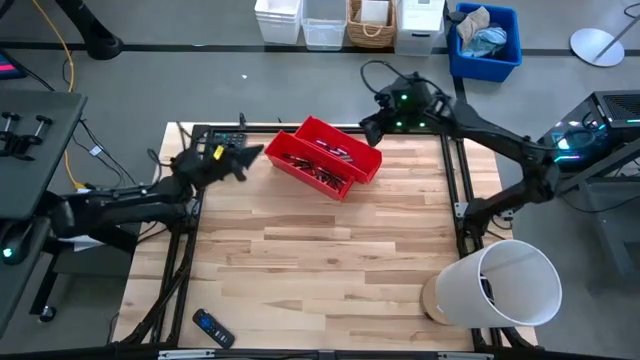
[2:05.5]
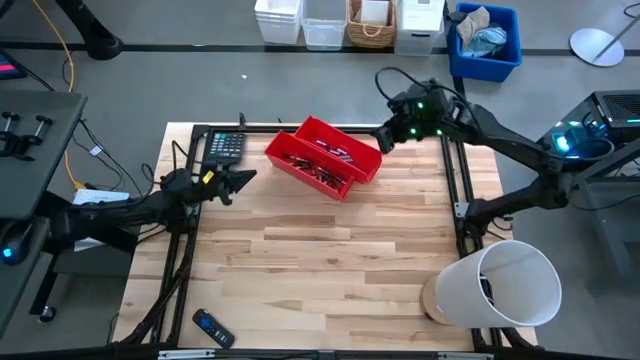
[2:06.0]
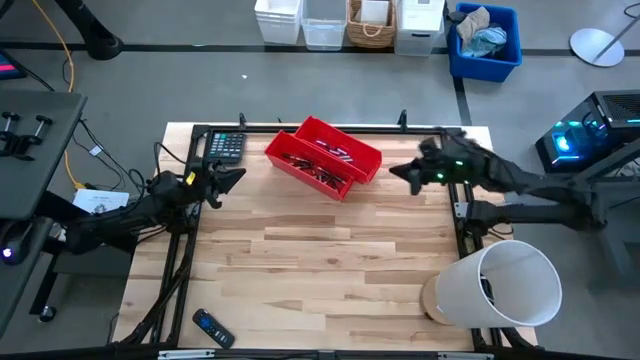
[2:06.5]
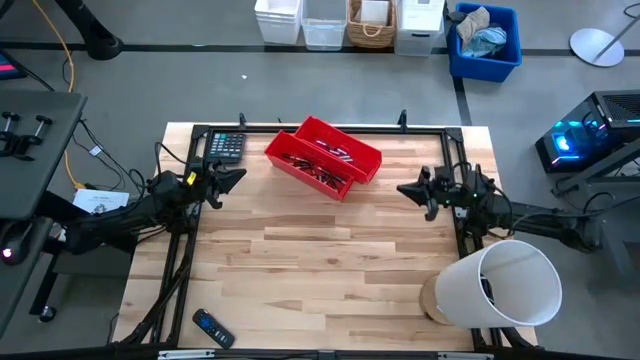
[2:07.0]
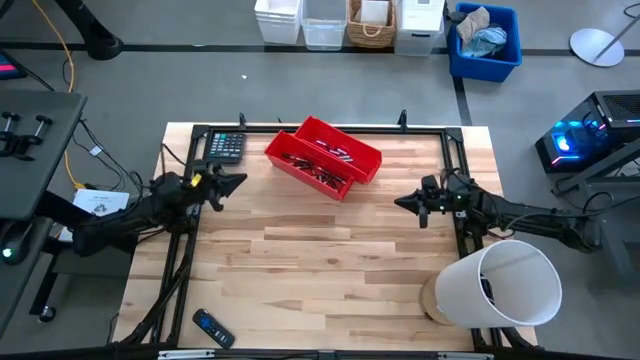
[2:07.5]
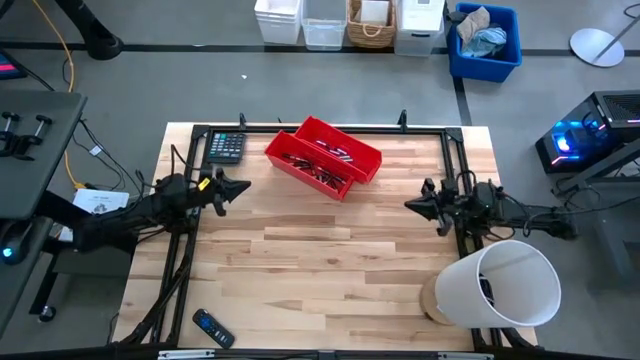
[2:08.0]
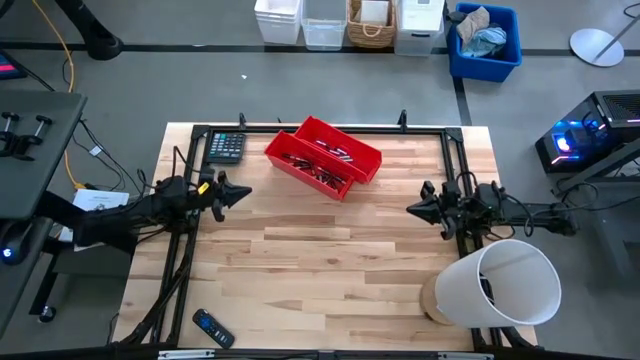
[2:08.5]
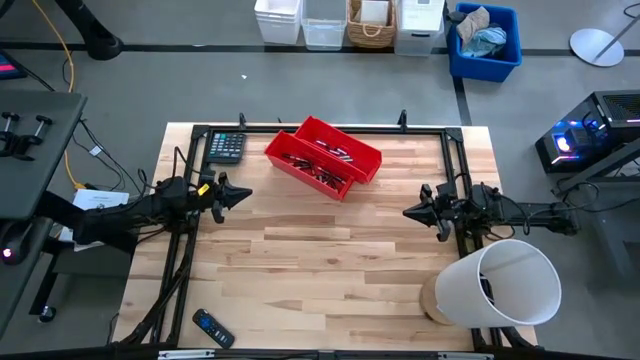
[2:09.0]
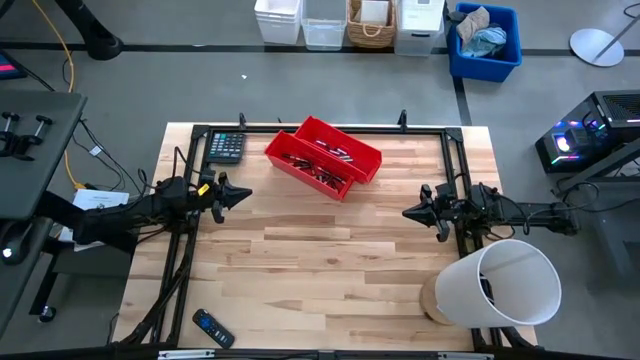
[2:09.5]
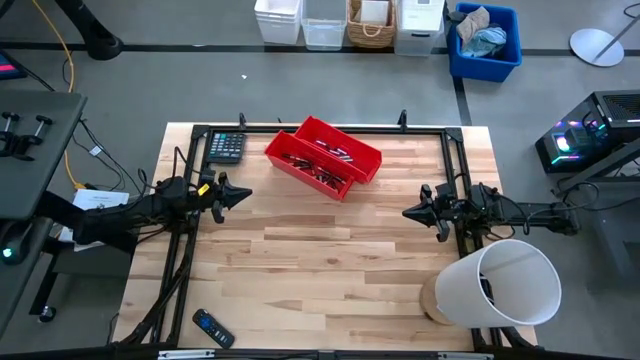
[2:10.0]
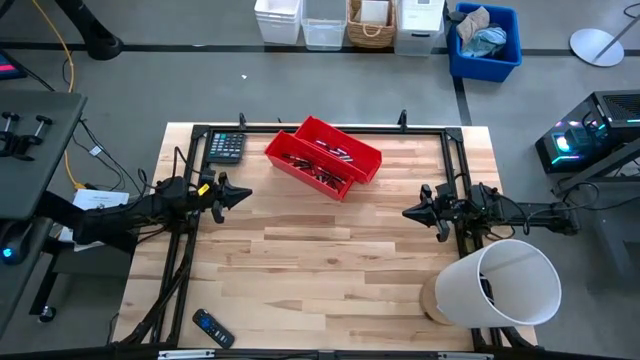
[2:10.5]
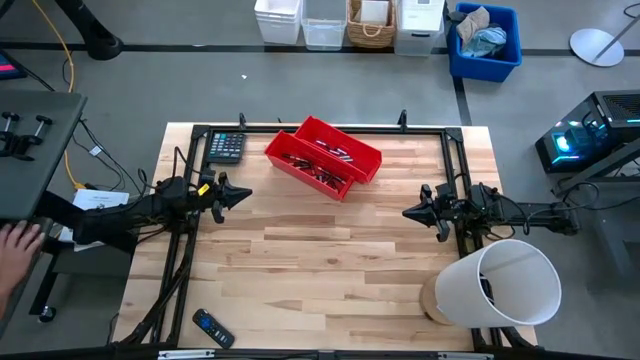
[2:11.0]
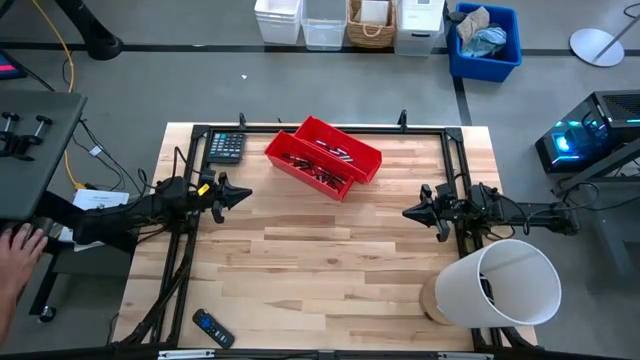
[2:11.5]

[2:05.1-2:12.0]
Task: Sort batteries
Return to Home Position

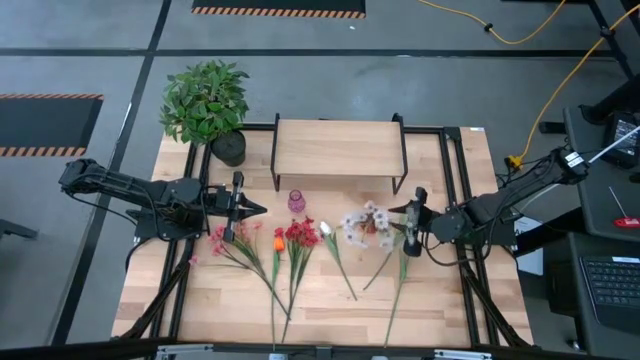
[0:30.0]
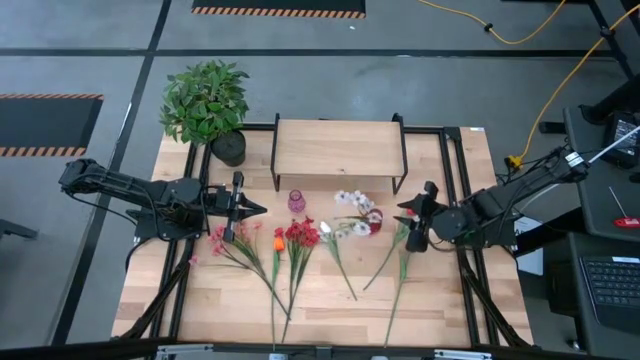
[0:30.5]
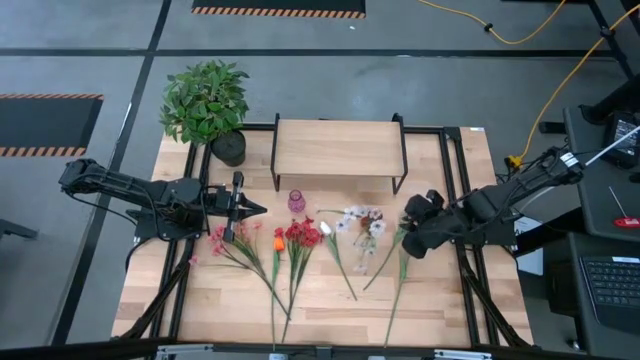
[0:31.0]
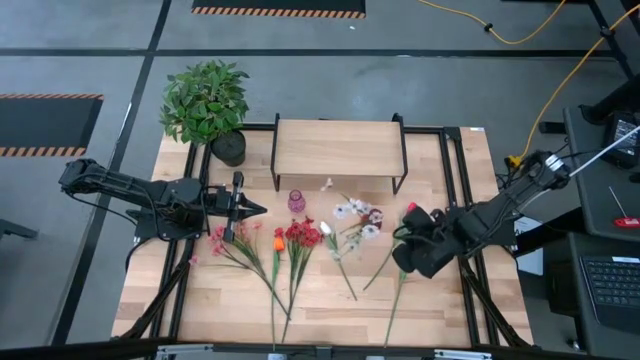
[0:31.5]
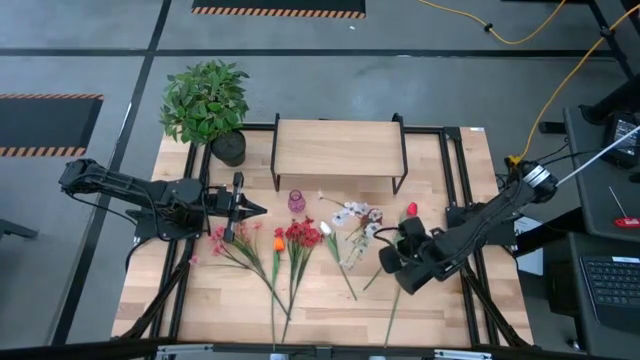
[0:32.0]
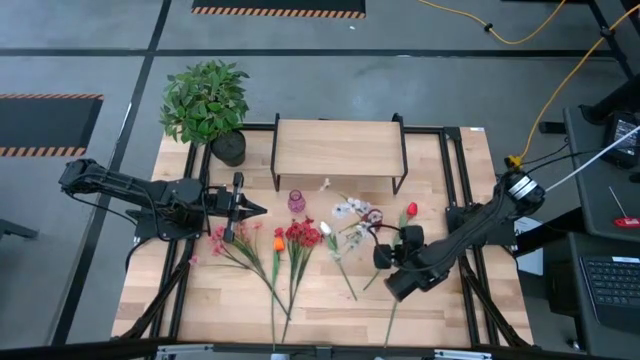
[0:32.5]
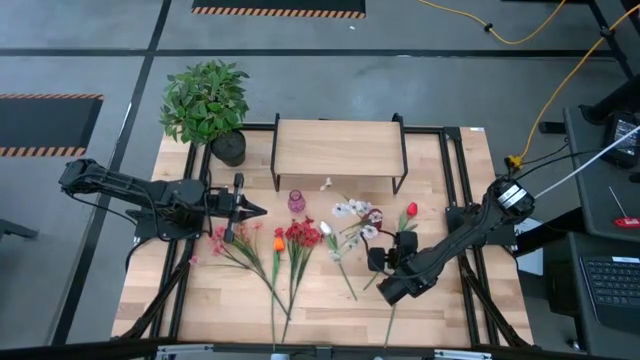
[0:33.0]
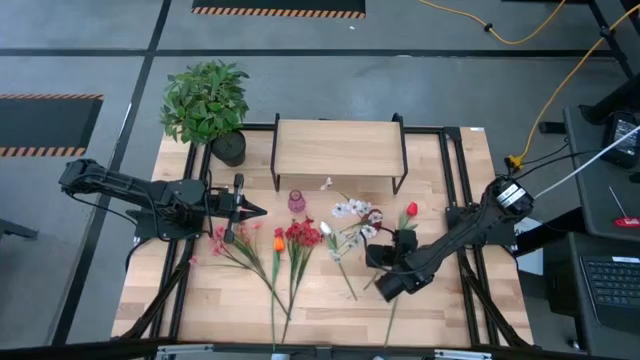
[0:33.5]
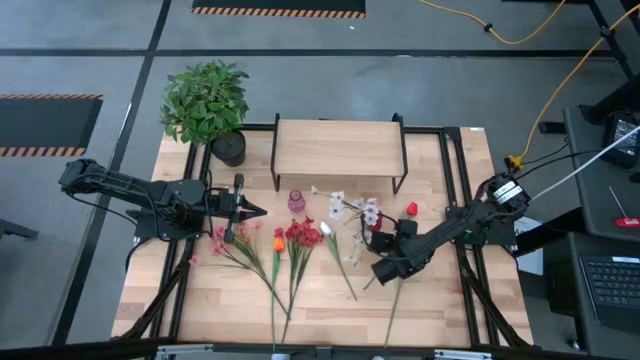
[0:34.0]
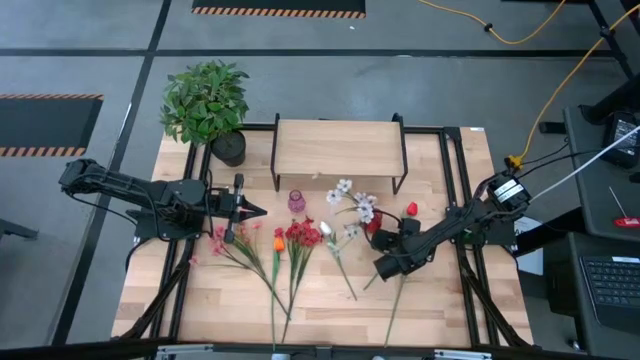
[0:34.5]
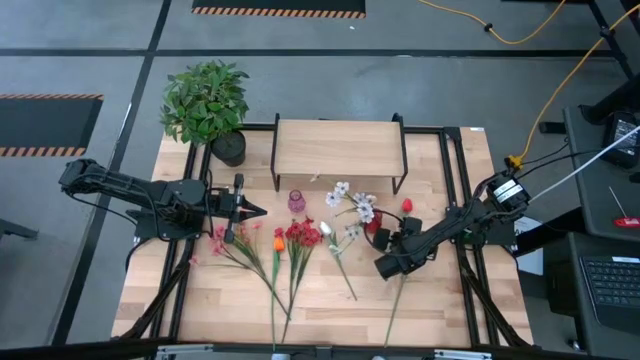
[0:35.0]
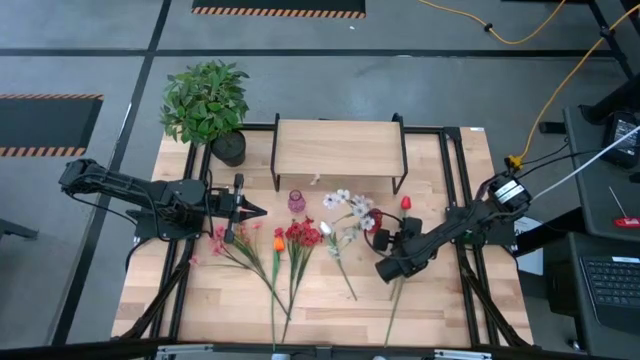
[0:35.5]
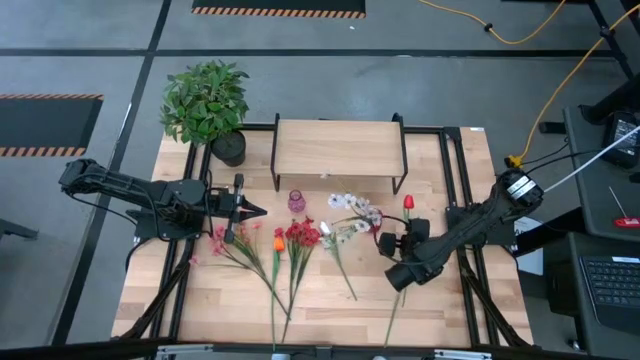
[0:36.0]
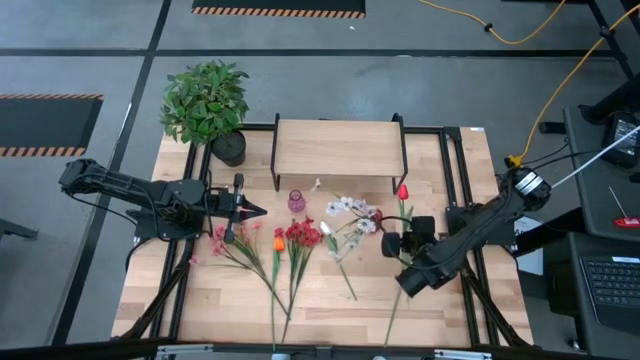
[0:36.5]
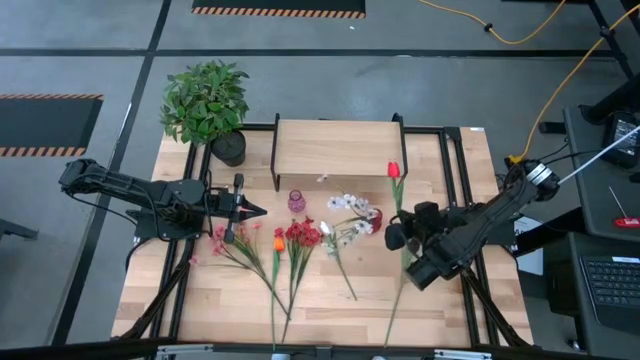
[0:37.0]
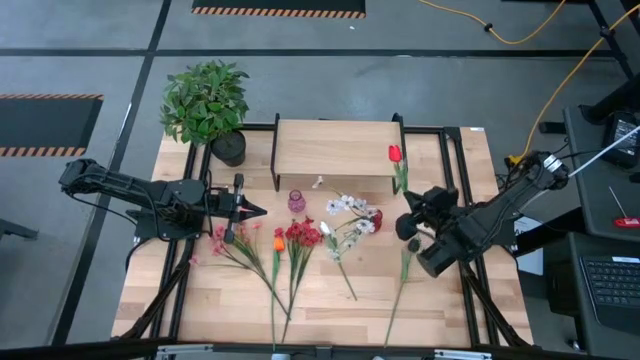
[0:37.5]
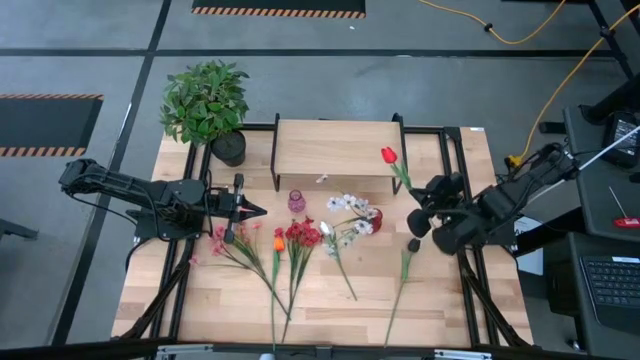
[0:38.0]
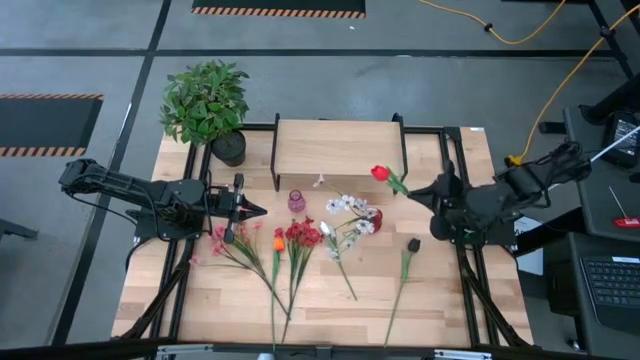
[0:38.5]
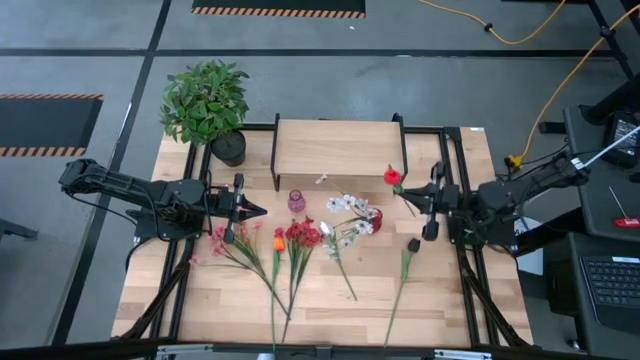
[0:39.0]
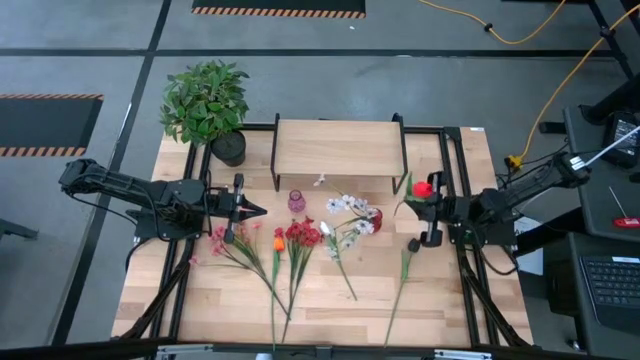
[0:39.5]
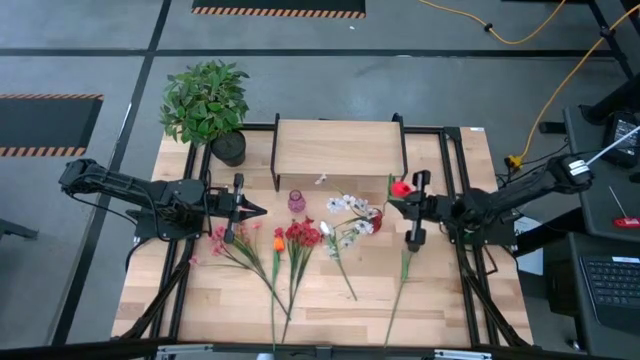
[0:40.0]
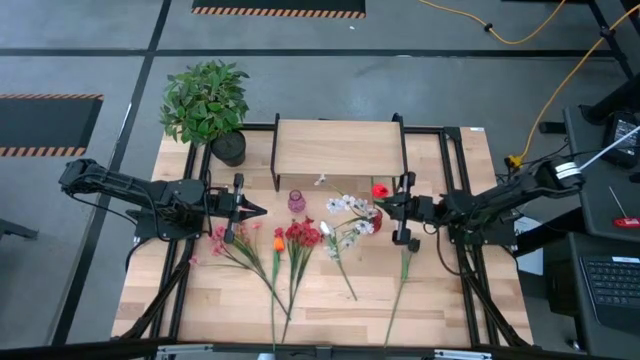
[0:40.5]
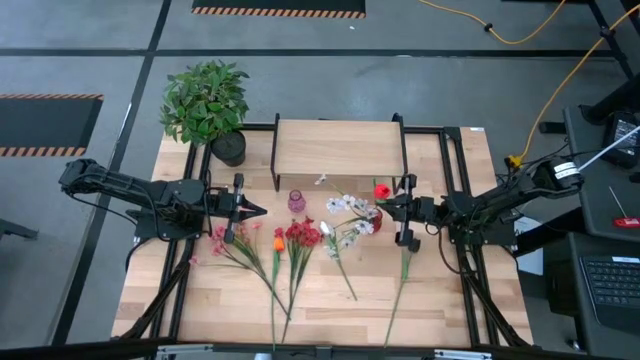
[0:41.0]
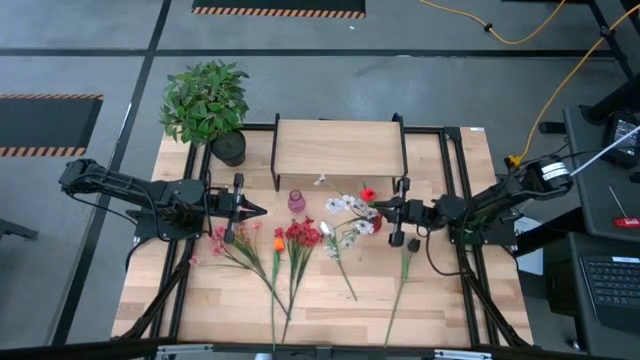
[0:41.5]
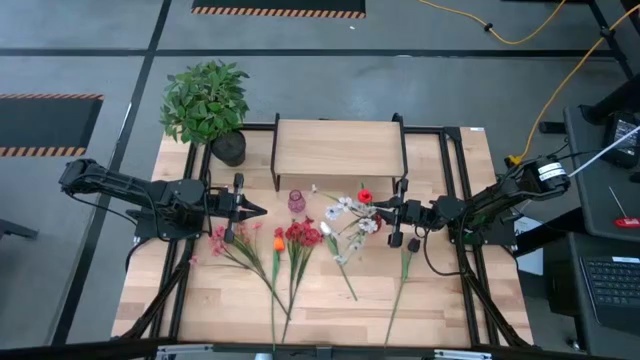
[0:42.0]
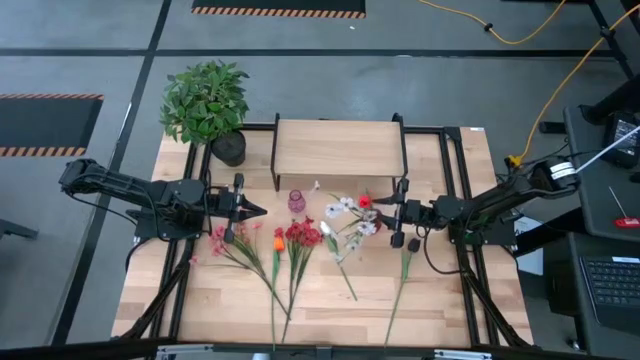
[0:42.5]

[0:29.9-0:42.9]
Task: Pick and place flowers into a vace then onto a shelf
Put the red tulip into the red vase
